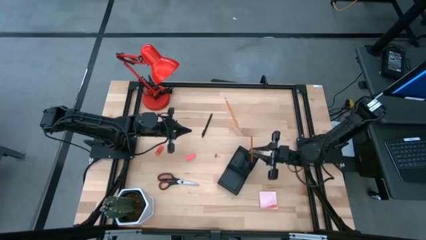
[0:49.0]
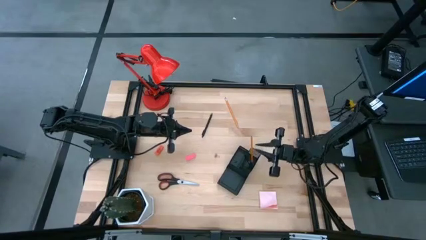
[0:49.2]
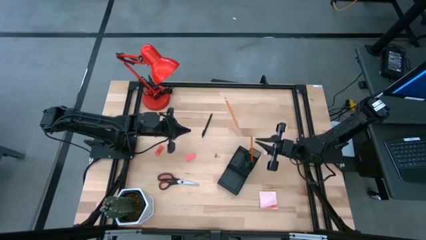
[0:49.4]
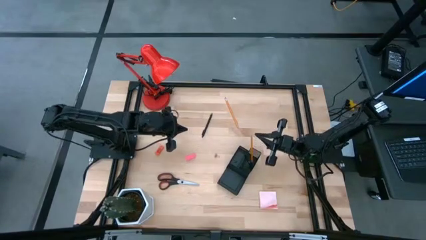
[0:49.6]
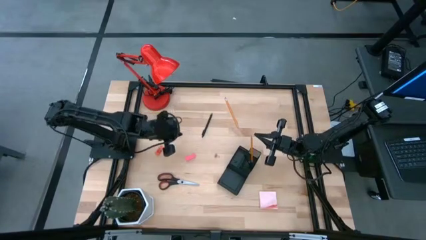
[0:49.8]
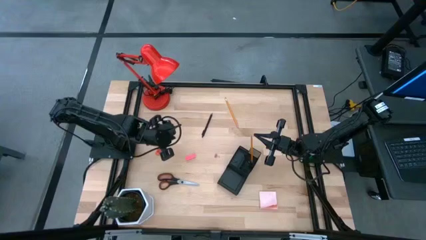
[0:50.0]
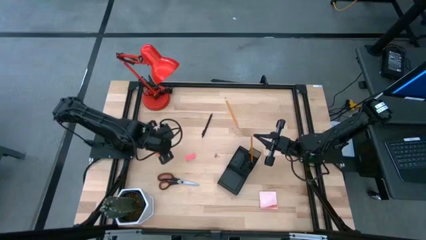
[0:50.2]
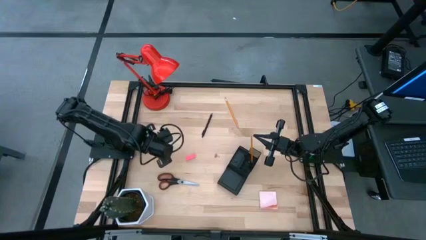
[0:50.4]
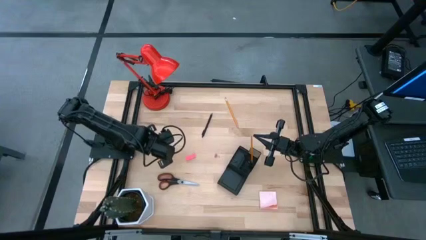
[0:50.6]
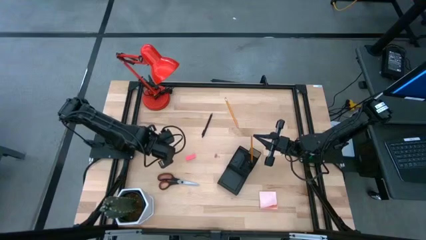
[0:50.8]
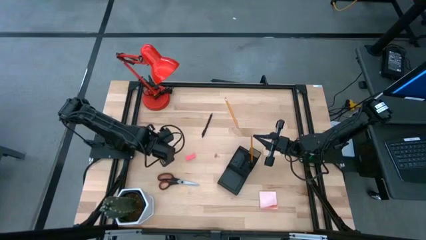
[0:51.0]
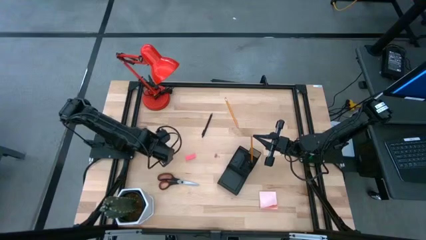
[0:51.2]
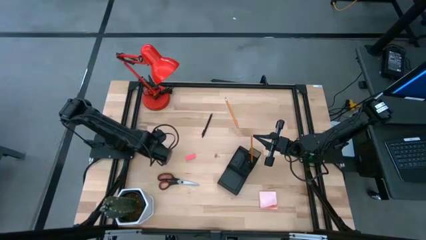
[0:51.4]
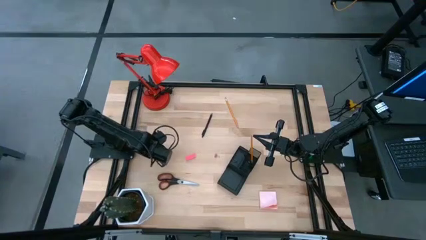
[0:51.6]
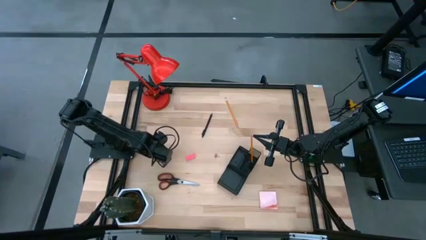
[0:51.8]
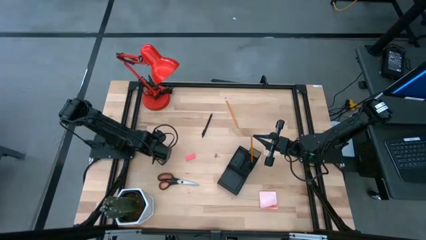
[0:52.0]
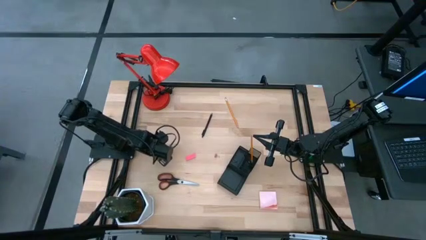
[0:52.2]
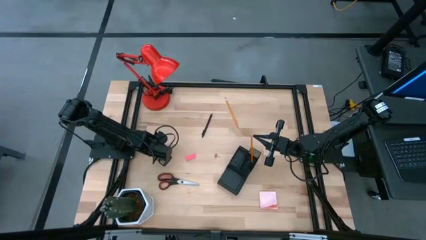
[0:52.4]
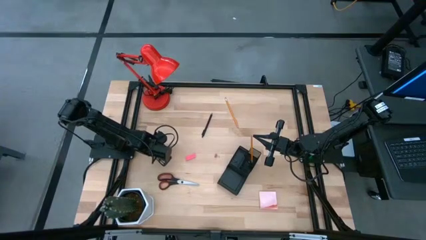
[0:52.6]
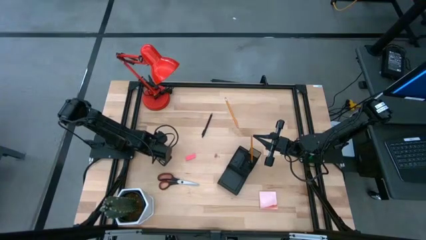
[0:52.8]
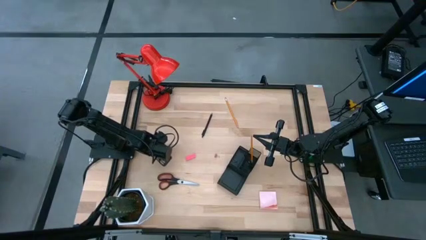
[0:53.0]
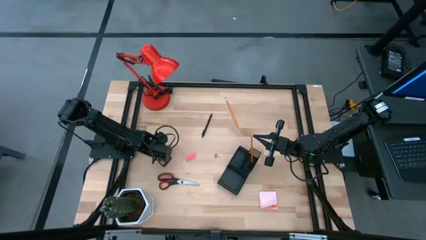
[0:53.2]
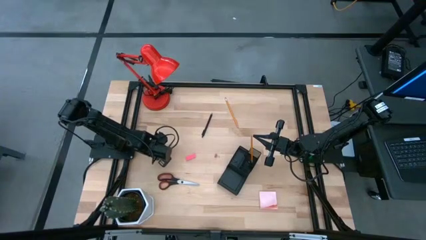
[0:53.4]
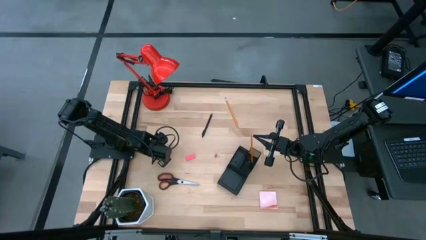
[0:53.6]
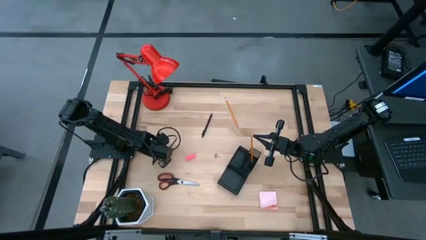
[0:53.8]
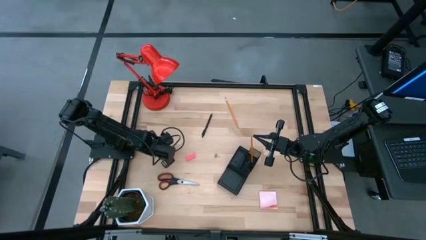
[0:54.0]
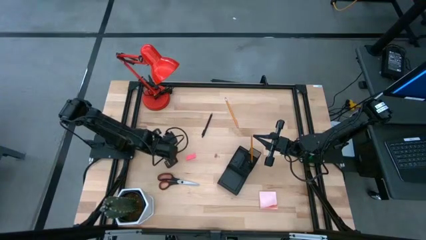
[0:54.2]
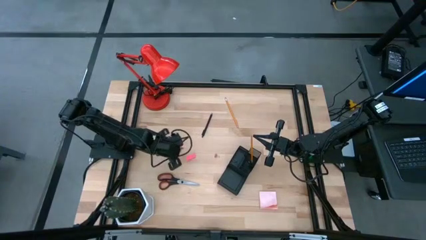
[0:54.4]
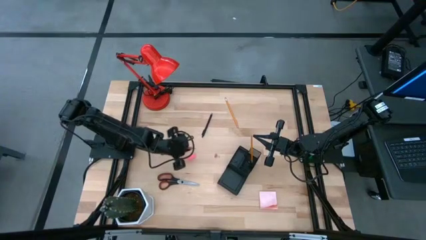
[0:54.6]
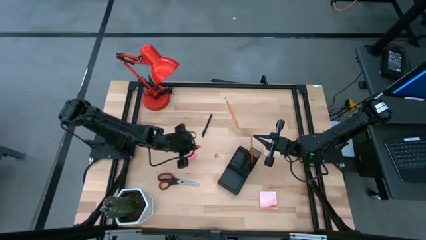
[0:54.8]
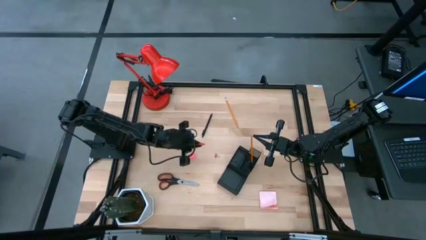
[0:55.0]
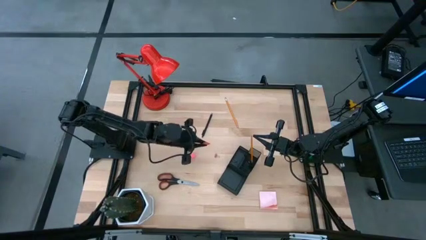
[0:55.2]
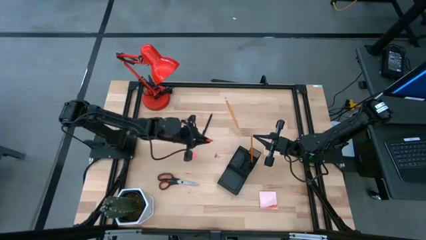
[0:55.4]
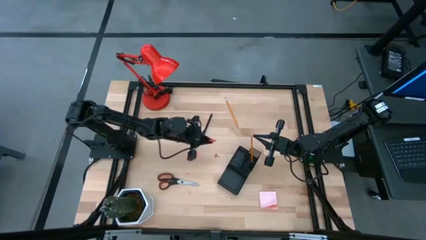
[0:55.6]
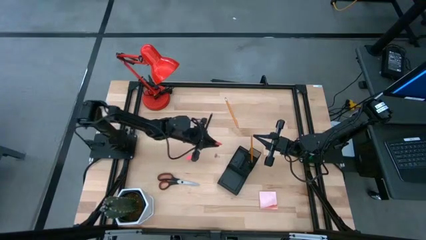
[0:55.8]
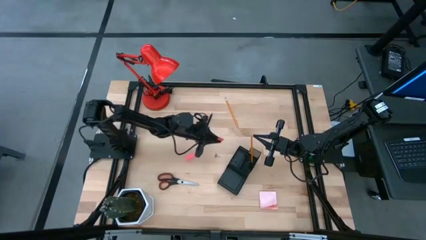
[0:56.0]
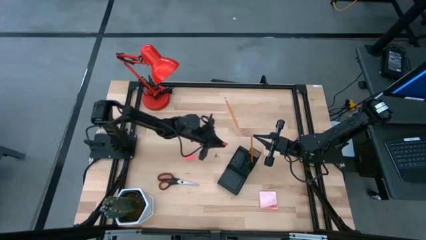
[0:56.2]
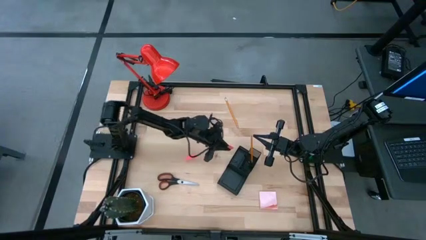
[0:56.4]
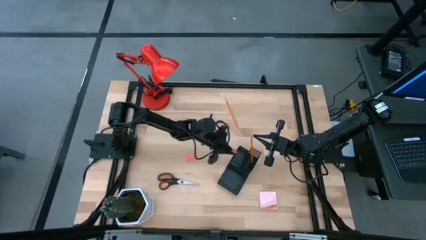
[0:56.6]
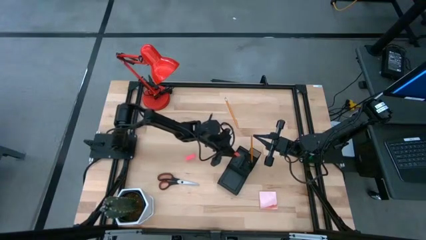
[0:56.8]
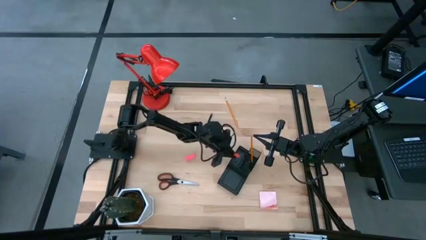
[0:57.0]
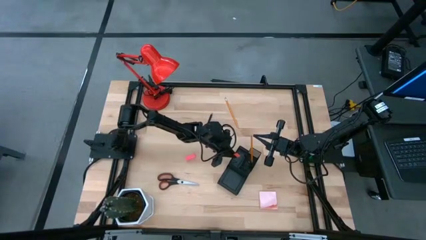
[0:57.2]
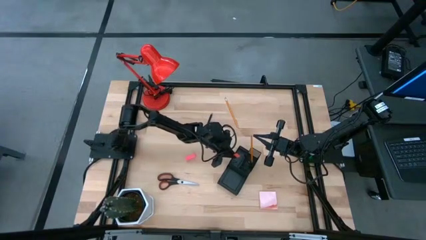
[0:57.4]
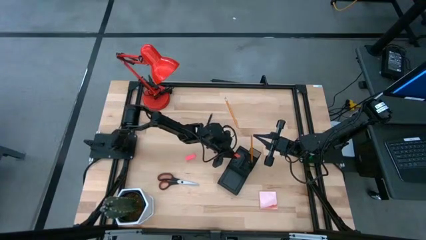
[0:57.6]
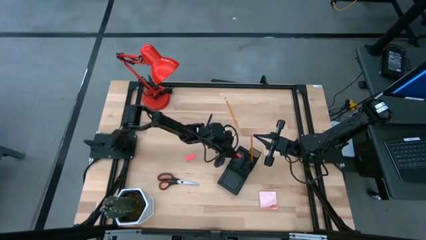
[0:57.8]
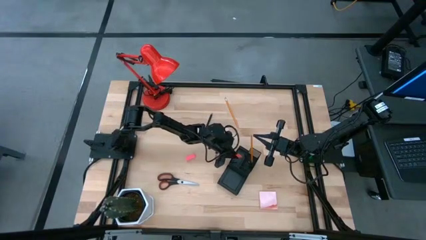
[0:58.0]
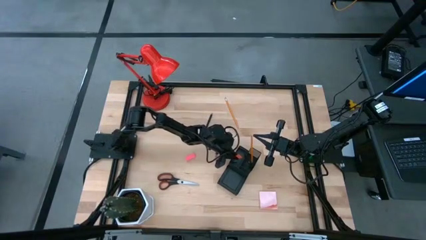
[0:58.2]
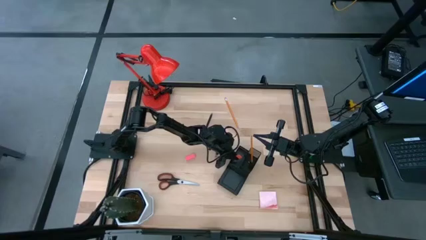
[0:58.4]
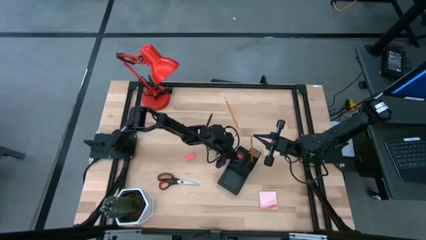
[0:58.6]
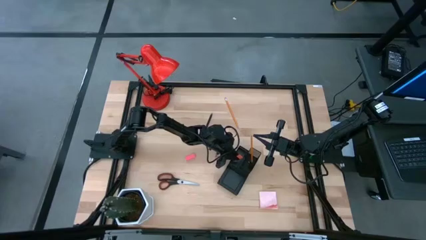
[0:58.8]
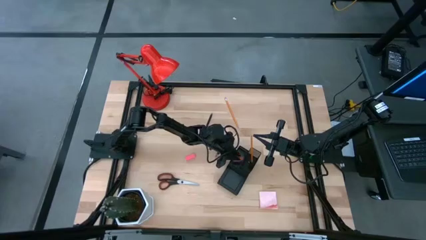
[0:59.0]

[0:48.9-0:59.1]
Task: Pick and place office supplies into organizer
Put the orange eraser into the desk organizer
